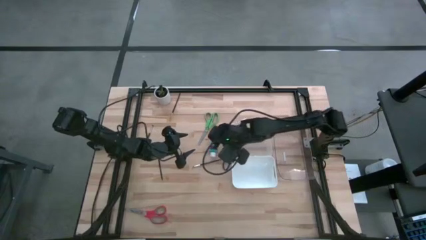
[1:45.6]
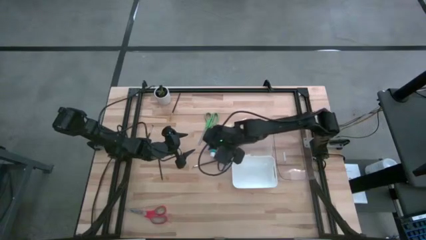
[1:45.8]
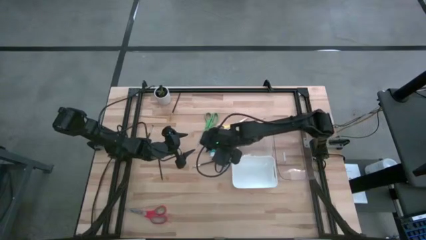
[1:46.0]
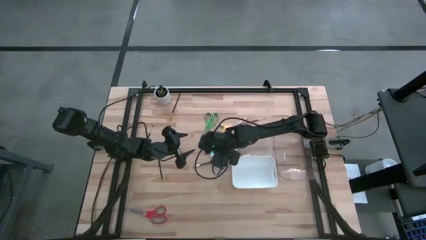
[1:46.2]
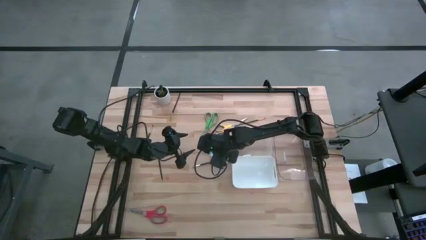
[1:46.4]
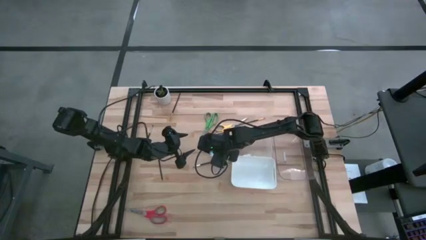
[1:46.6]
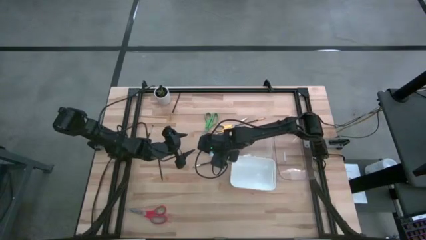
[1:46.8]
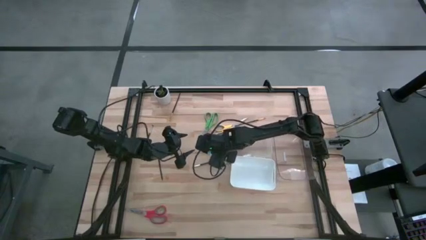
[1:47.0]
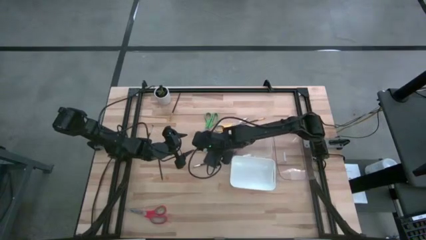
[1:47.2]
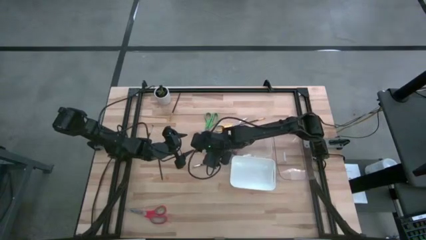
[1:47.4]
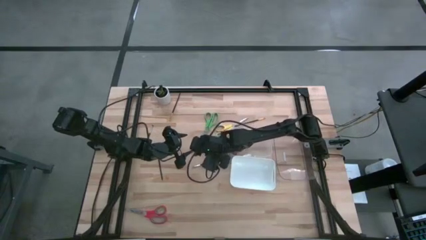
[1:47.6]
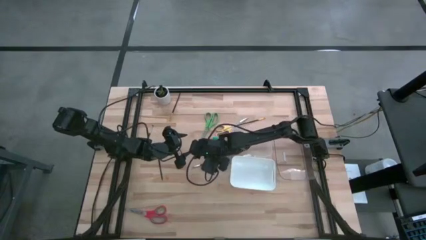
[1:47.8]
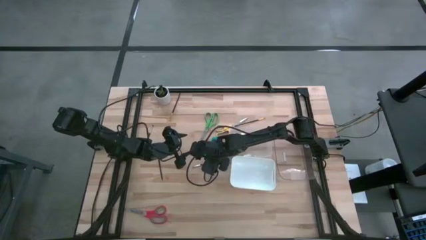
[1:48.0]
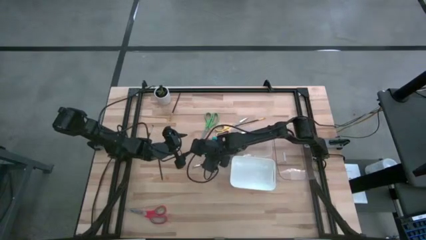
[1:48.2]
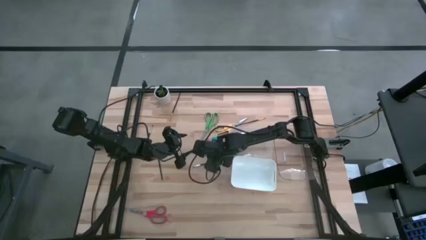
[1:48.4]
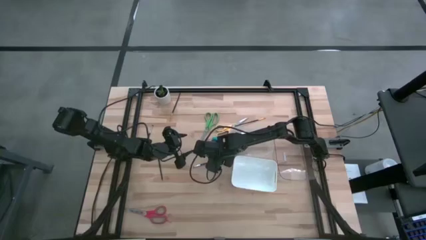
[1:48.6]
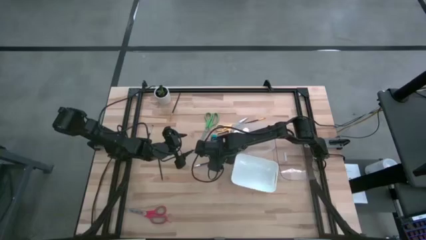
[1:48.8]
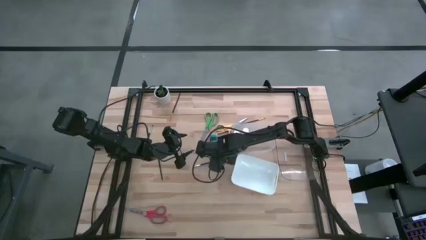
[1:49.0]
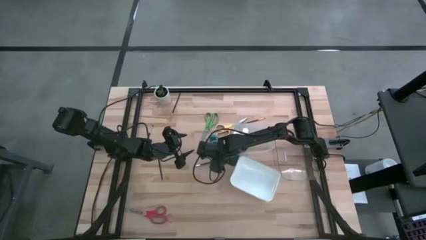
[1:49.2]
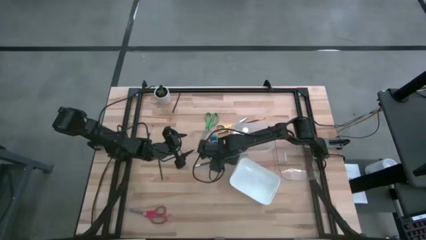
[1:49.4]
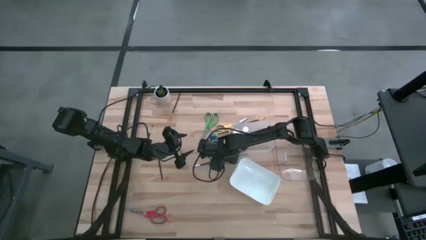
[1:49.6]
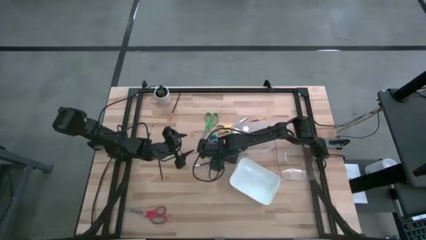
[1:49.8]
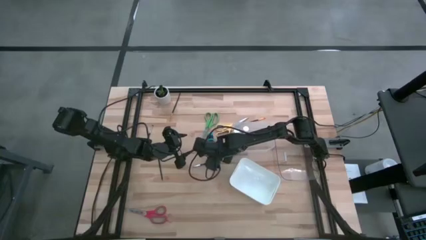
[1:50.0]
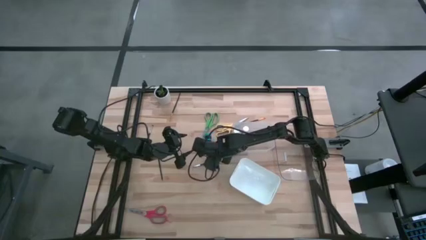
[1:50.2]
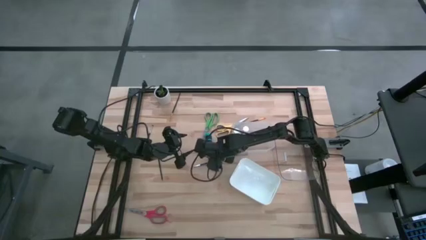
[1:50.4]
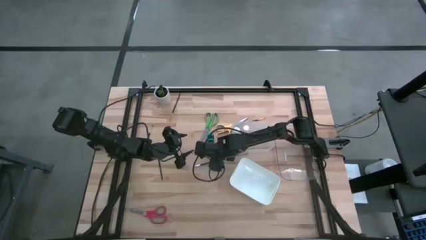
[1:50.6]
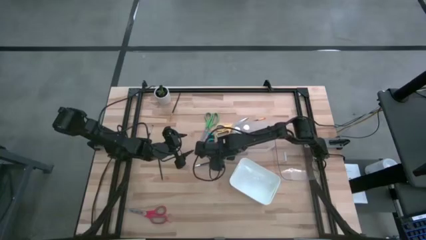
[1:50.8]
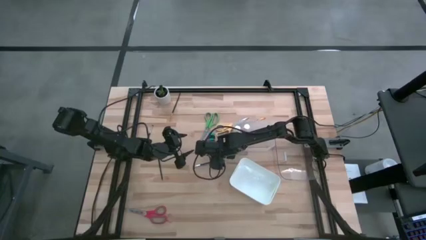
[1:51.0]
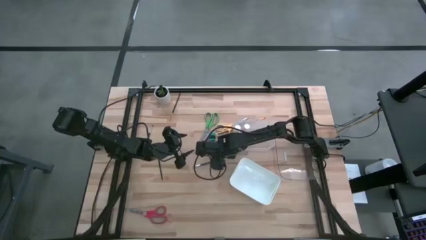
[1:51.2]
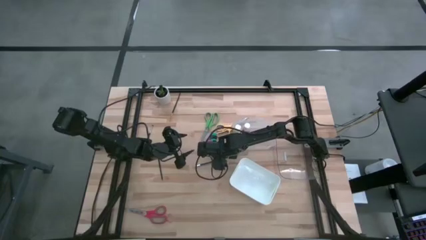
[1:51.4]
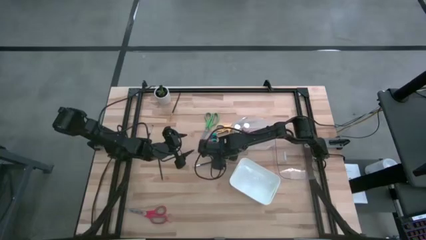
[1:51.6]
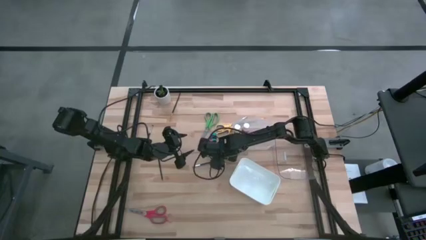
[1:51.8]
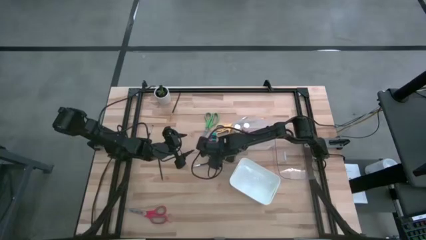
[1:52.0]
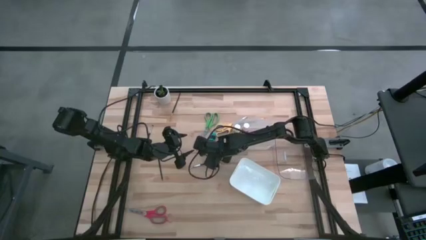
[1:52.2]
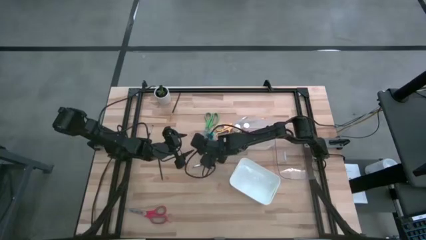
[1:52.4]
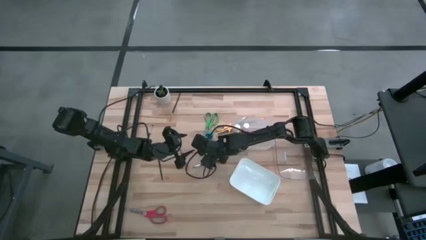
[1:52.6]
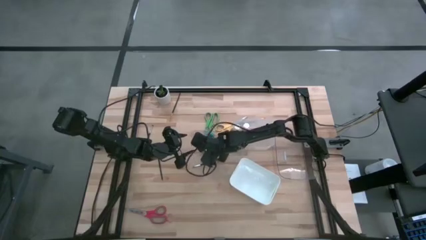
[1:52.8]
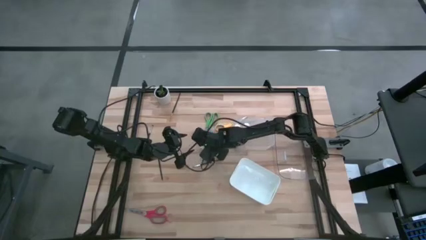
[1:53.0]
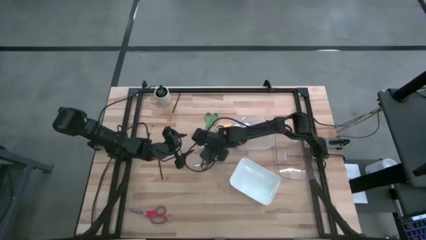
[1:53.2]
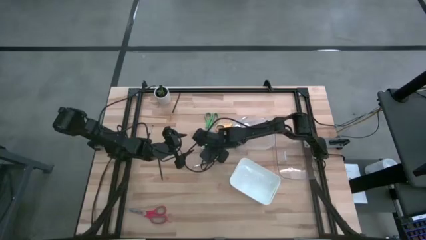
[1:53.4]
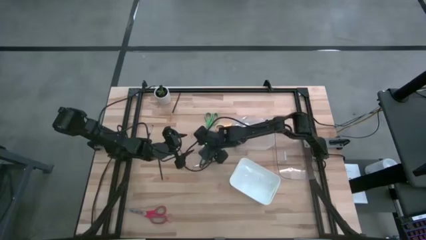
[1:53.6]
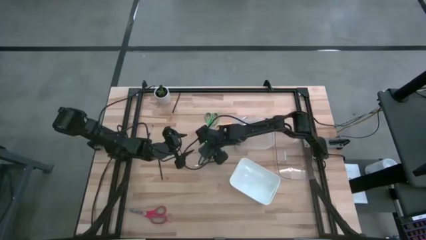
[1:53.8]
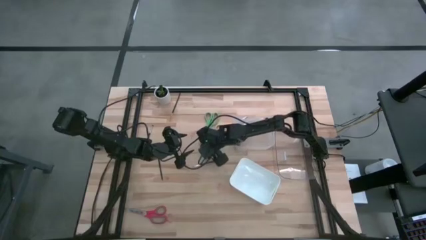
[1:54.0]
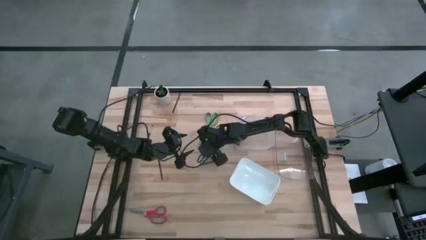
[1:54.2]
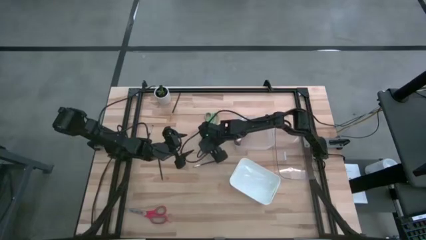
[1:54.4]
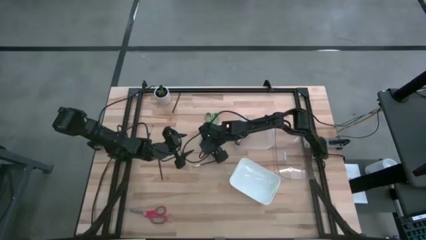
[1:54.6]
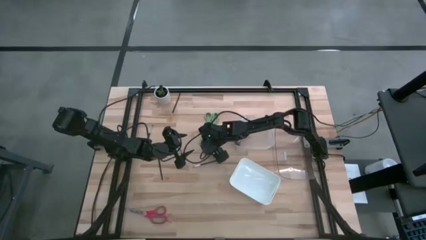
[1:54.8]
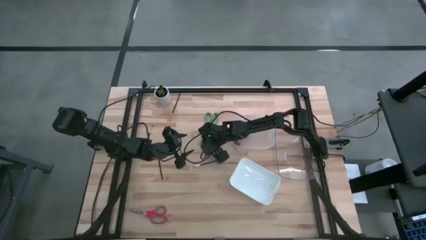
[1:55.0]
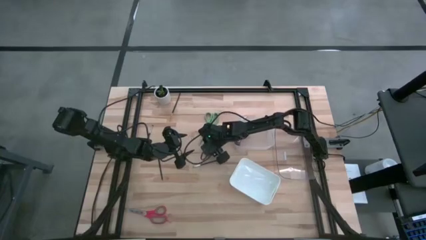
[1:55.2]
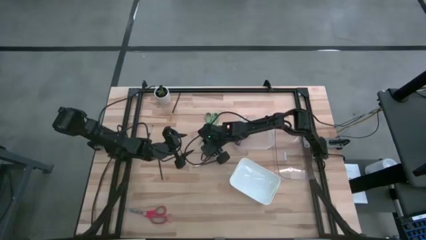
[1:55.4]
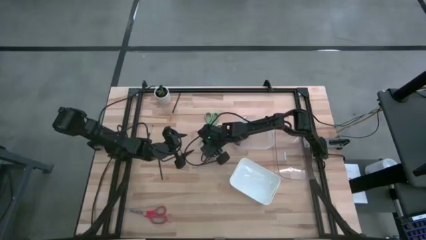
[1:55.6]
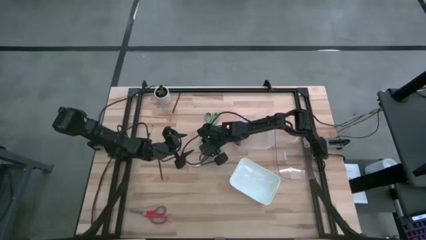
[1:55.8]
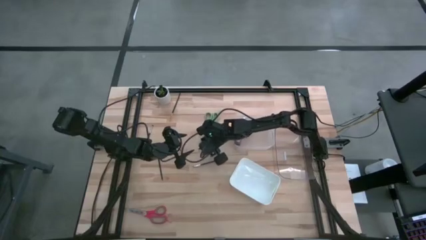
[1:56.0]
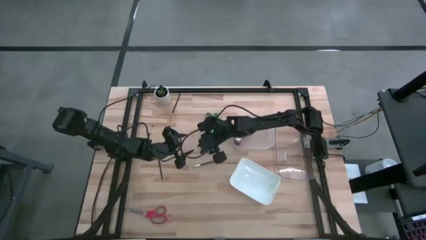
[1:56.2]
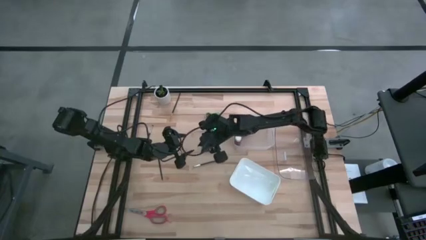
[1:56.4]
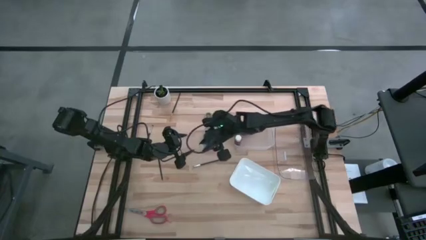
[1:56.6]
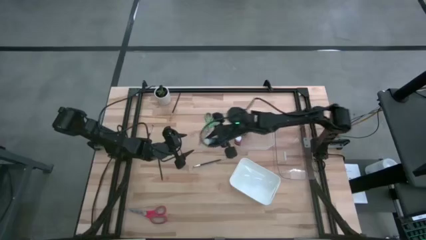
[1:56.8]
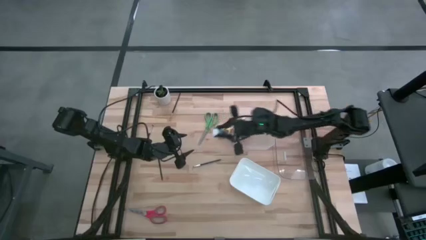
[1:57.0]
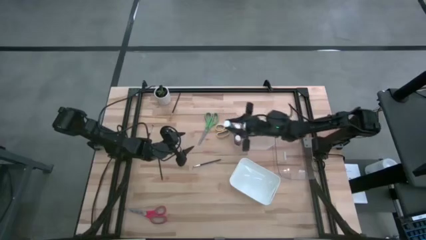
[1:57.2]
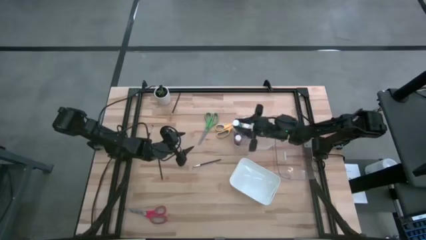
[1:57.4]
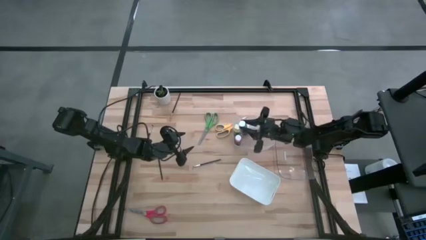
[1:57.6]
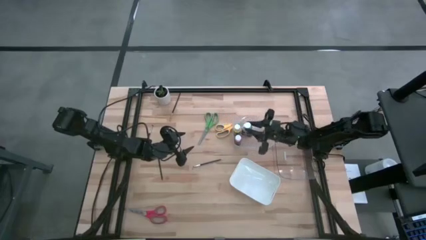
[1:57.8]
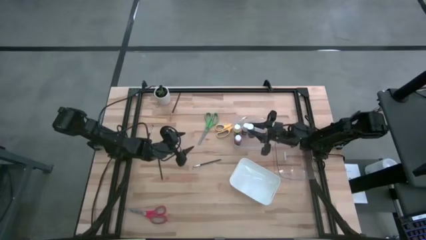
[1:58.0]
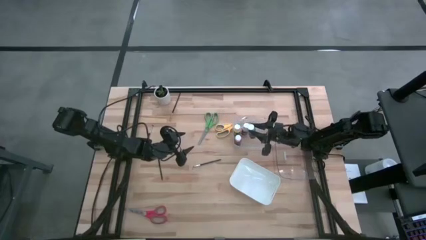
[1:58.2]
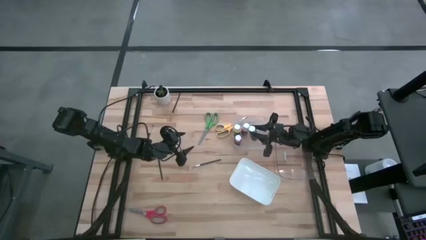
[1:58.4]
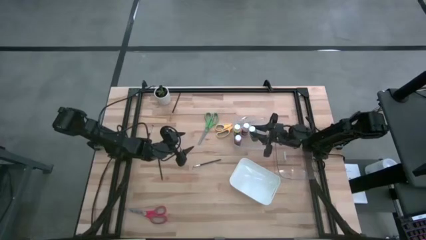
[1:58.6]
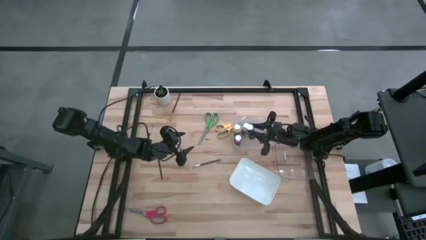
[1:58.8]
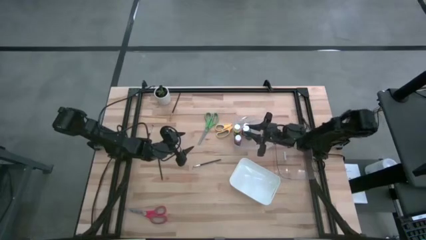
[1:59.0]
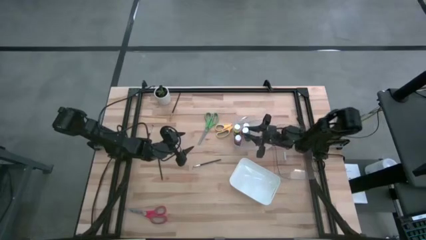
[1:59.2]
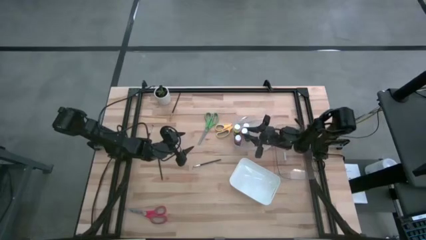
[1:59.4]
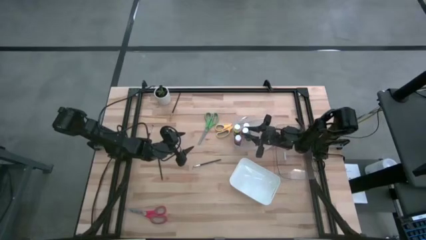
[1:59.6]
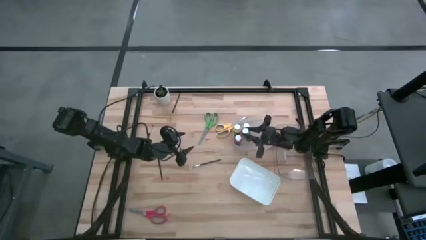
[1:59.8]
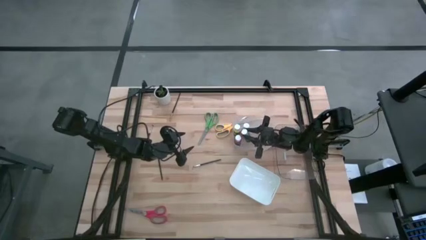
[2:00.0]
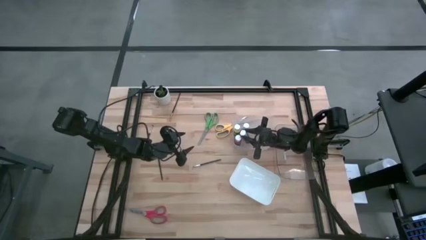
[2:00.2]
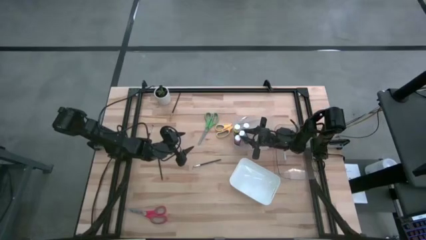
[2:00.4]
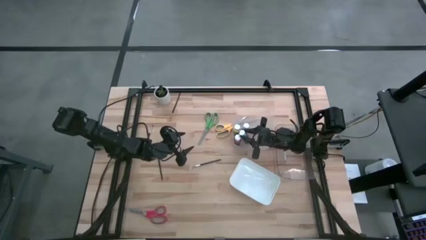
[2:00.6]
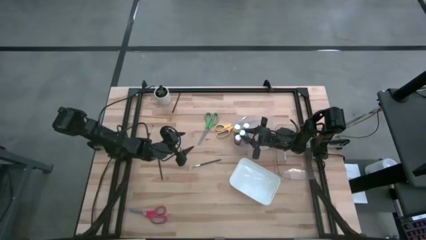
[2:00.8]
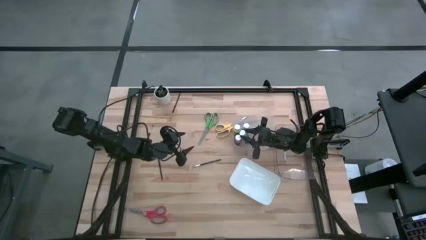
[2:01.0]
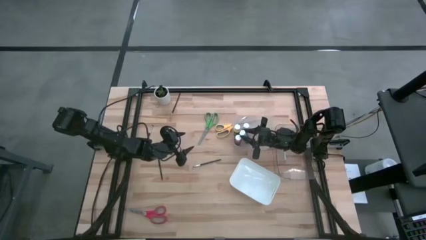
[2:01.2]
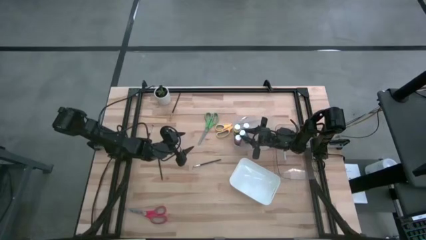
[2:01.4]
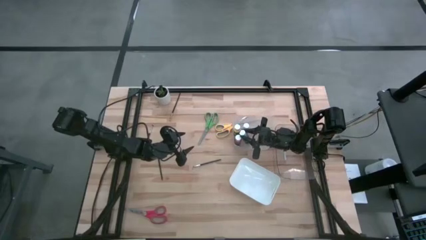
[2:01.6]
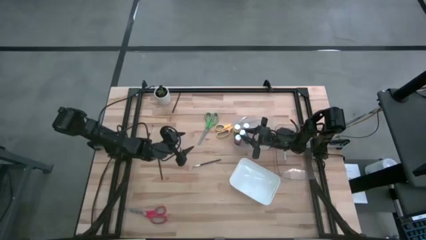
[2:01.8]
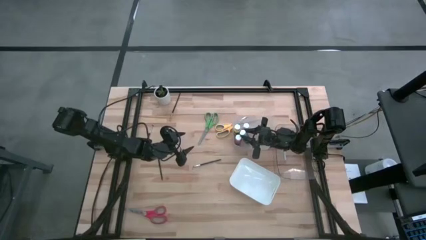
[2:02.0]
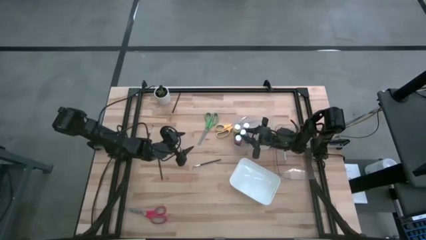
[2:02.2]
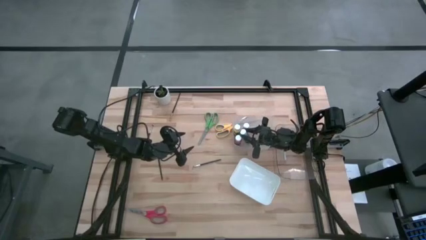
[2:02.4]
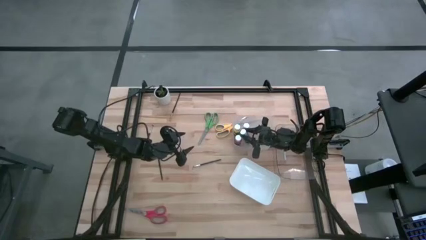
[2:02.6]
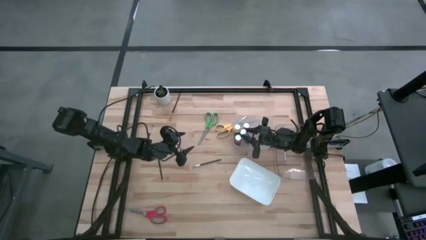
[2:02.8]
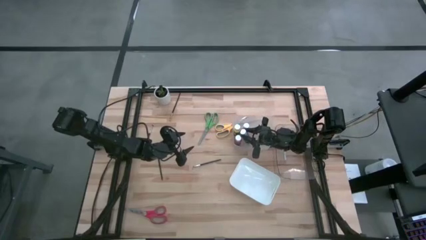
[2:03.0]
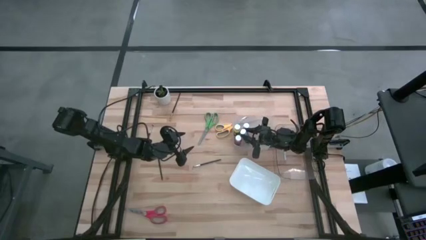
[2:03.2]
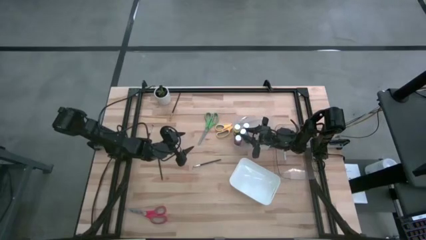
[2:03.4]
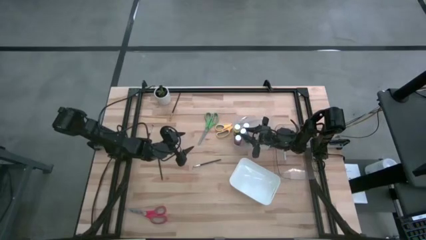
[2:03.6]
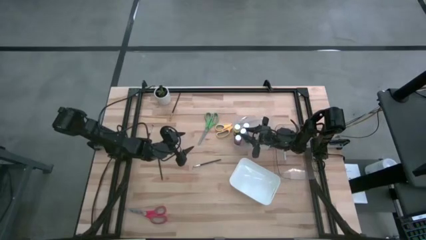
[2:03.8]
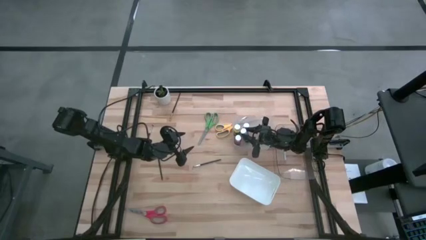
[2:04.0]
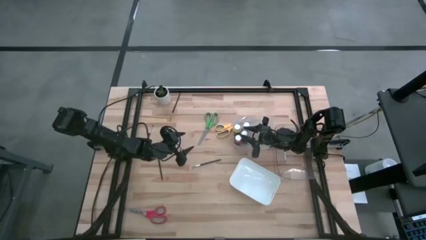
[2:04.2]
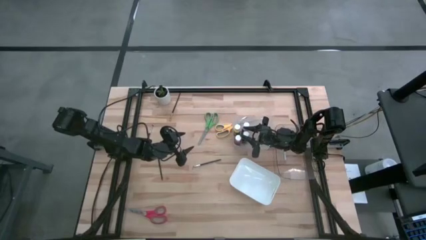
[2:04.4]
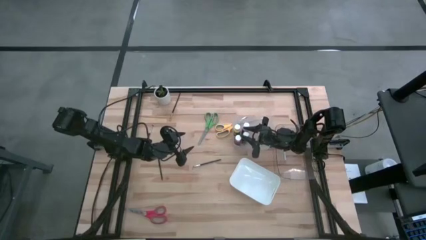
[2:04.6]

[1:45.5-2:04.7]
Task: Pick & Place Paint Supplies
Put the blue paint bottle into the left transparent bin
